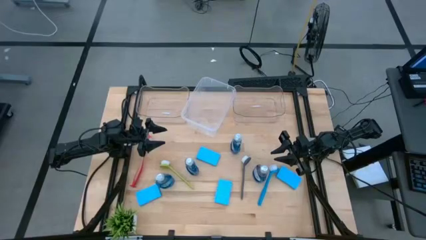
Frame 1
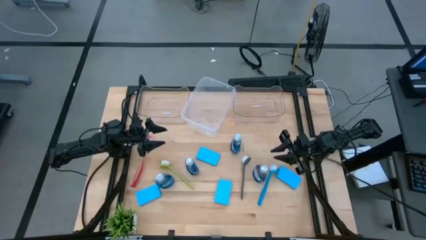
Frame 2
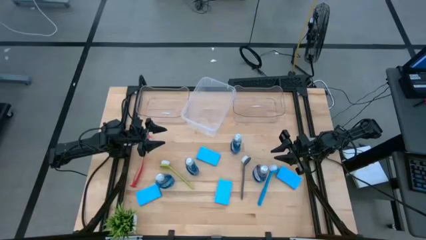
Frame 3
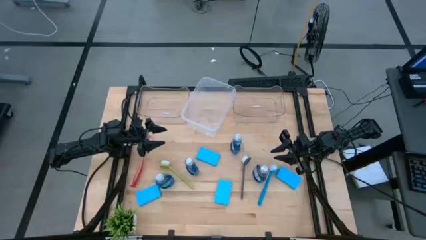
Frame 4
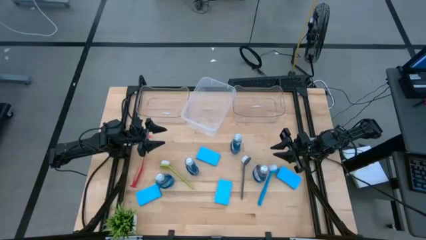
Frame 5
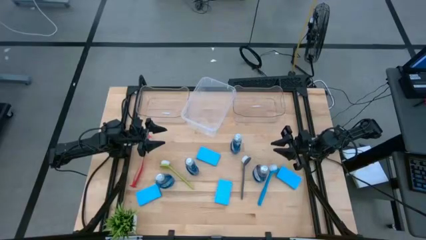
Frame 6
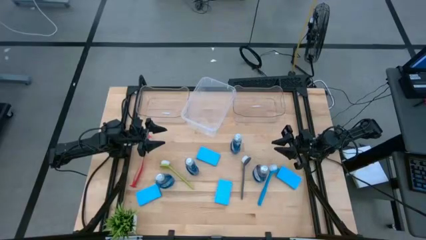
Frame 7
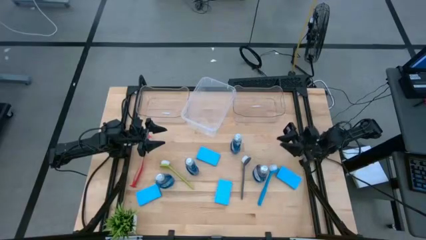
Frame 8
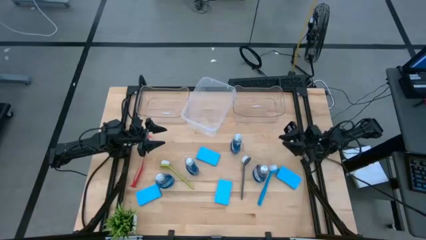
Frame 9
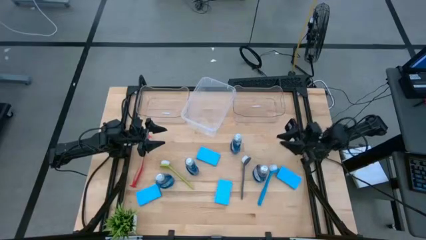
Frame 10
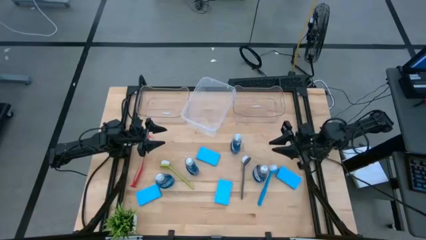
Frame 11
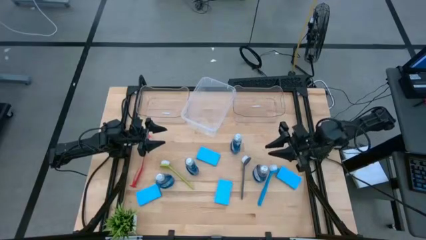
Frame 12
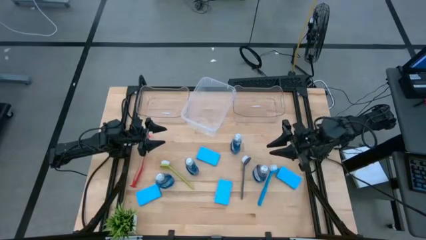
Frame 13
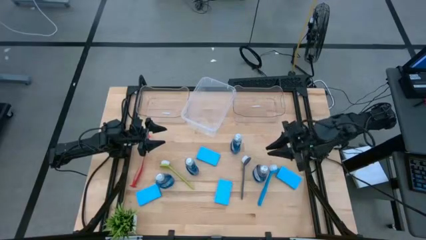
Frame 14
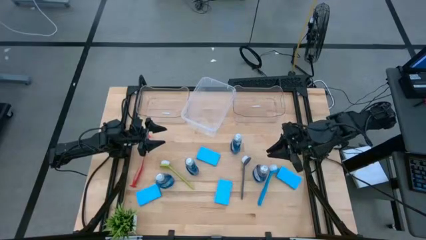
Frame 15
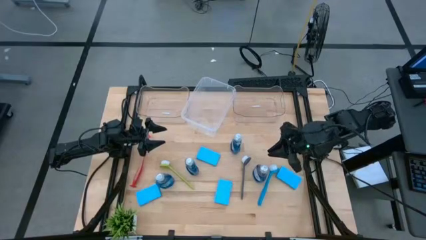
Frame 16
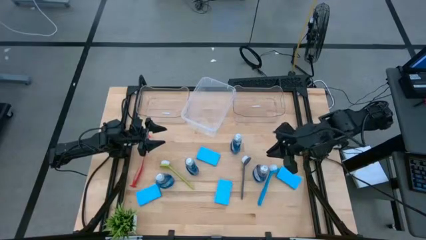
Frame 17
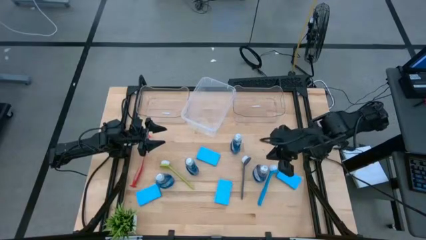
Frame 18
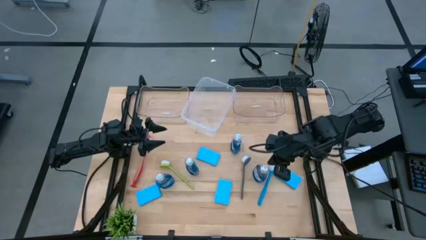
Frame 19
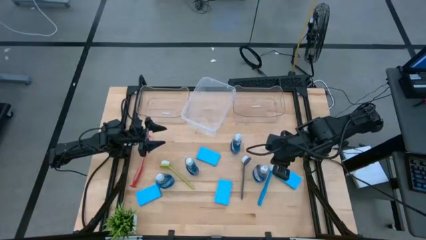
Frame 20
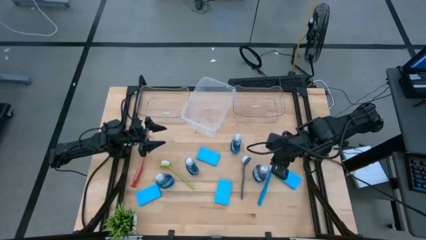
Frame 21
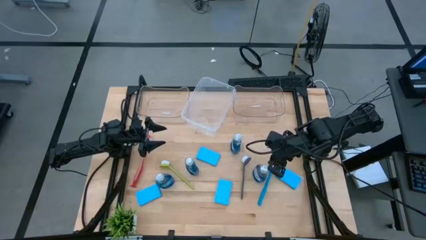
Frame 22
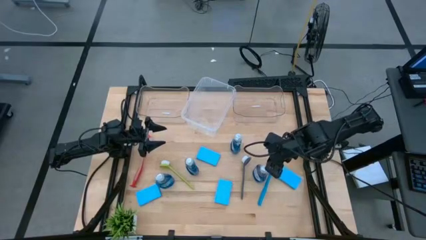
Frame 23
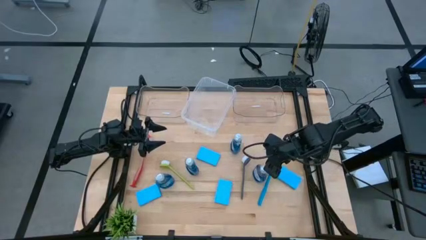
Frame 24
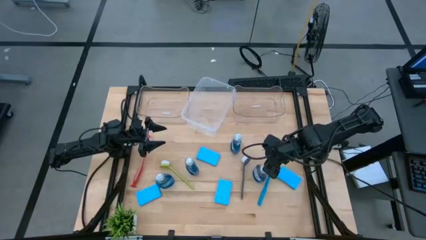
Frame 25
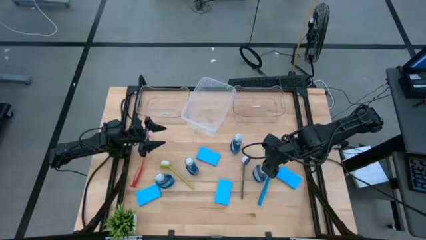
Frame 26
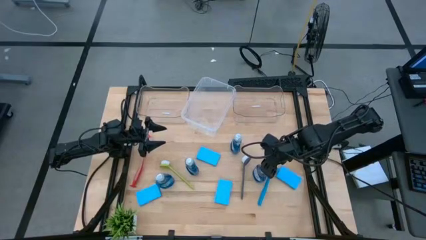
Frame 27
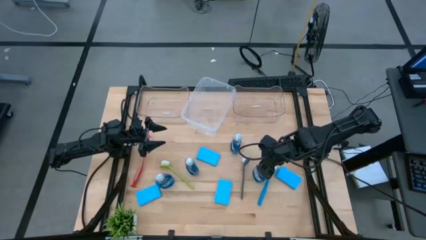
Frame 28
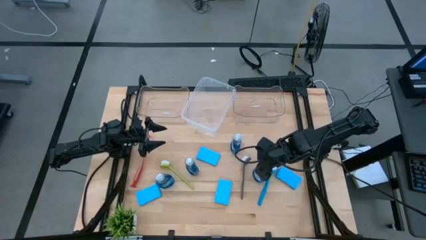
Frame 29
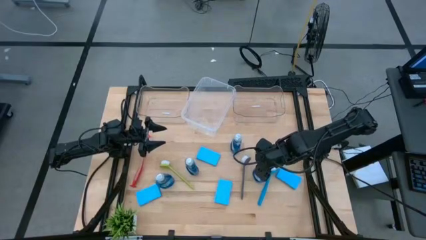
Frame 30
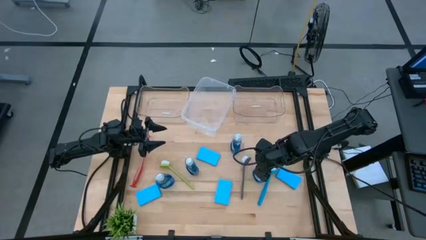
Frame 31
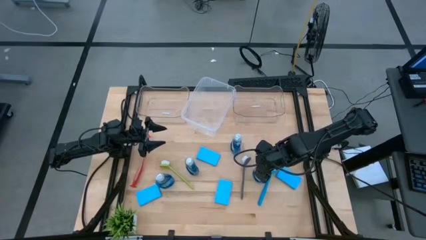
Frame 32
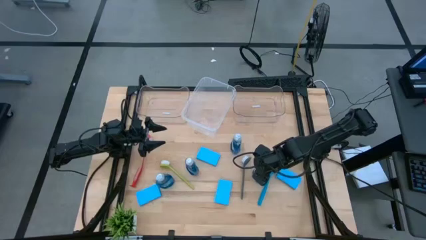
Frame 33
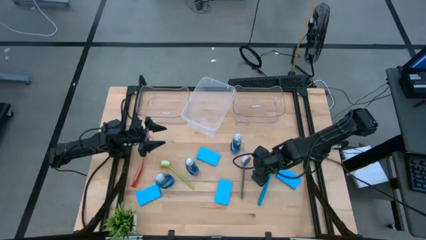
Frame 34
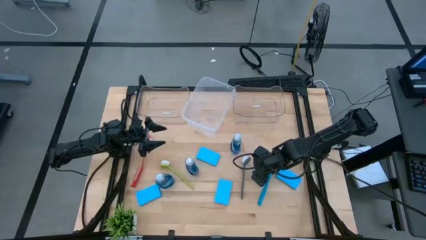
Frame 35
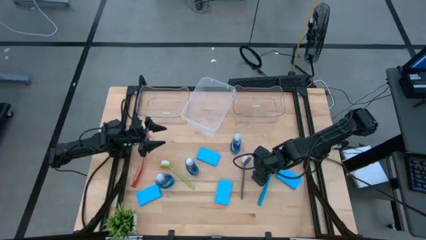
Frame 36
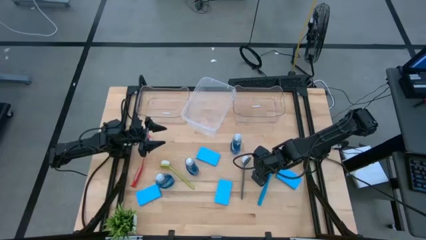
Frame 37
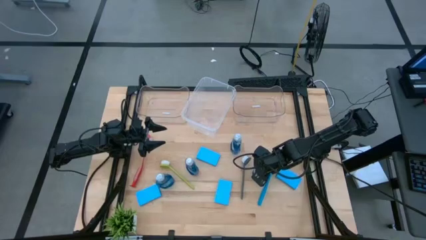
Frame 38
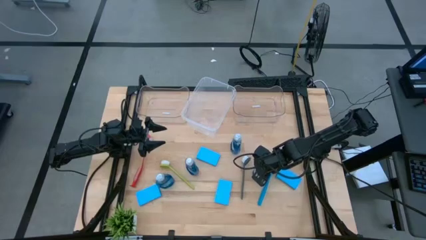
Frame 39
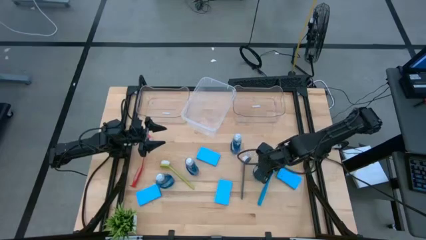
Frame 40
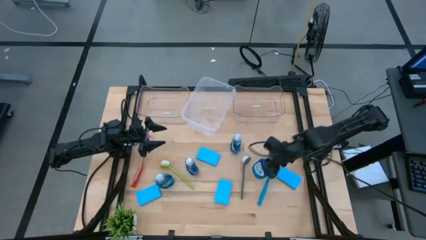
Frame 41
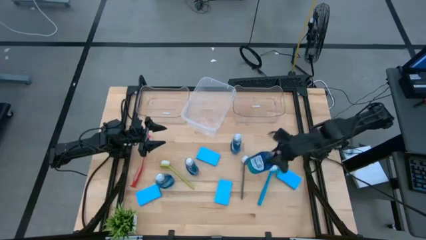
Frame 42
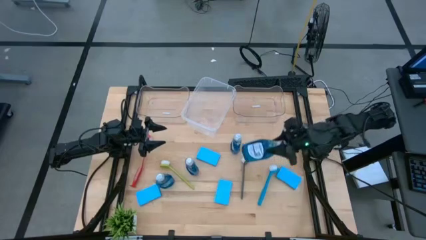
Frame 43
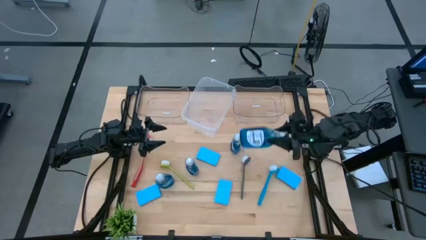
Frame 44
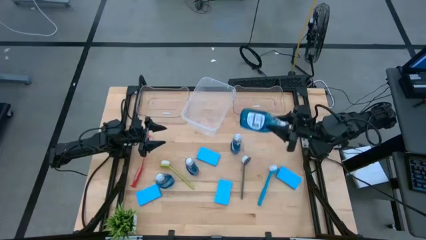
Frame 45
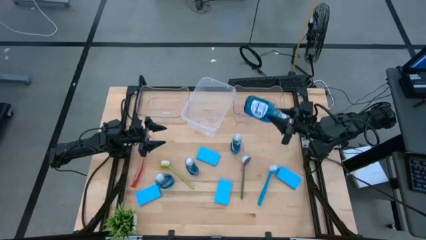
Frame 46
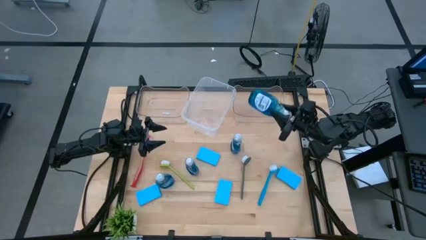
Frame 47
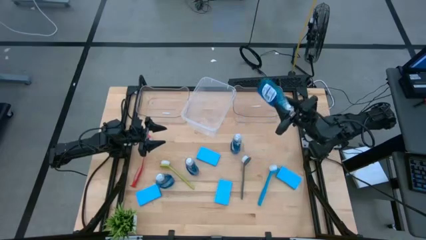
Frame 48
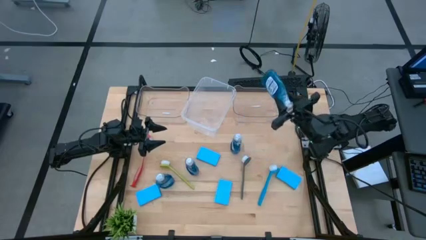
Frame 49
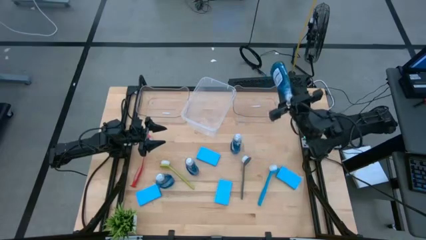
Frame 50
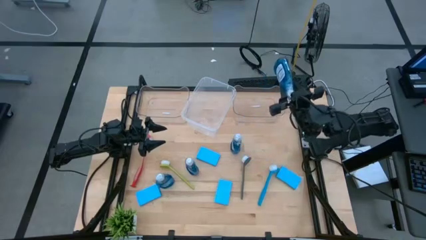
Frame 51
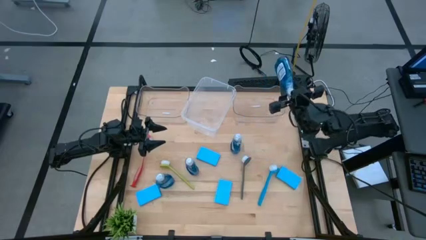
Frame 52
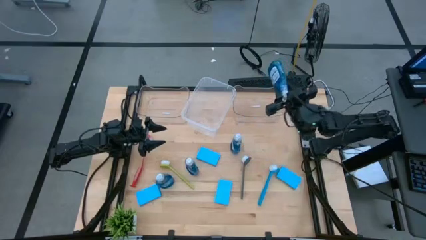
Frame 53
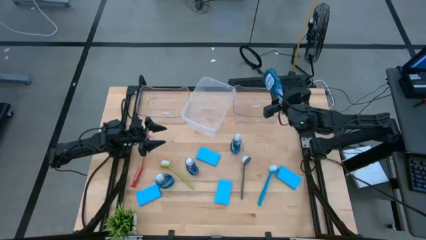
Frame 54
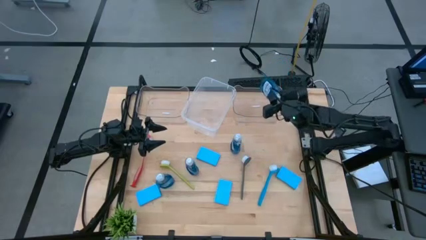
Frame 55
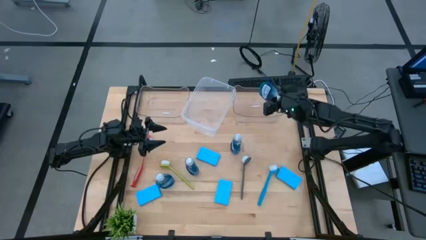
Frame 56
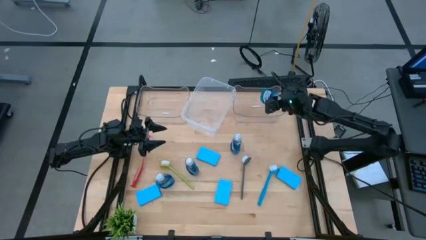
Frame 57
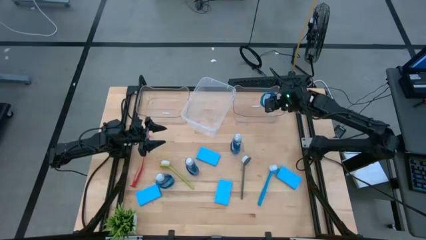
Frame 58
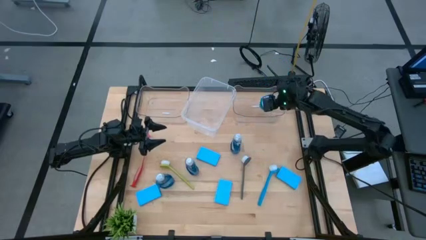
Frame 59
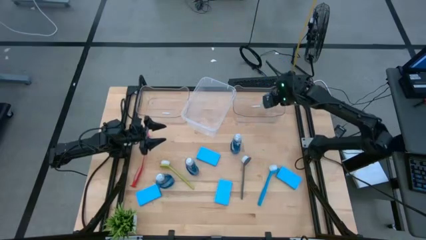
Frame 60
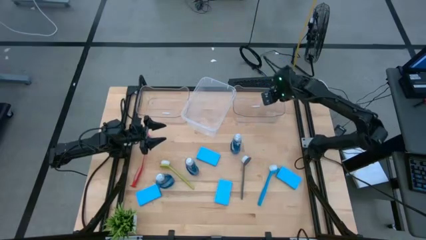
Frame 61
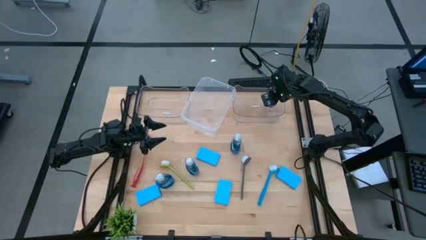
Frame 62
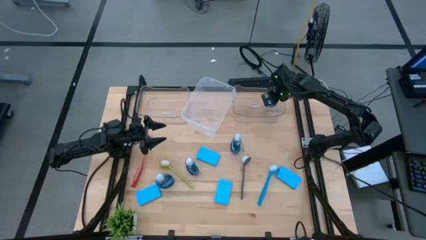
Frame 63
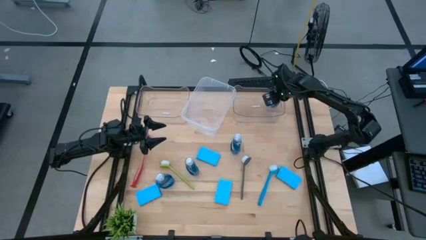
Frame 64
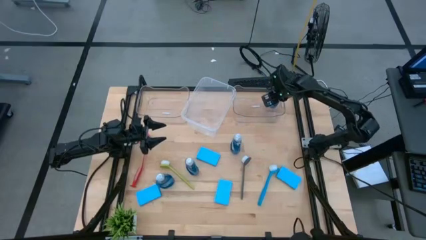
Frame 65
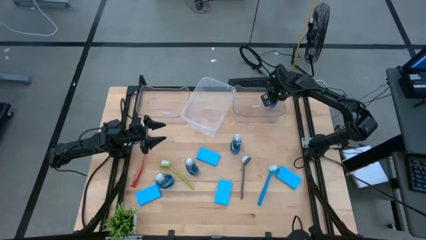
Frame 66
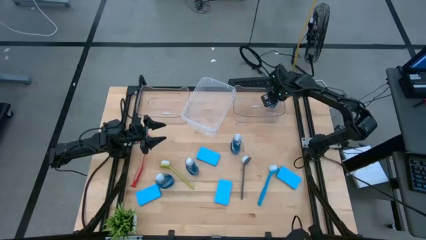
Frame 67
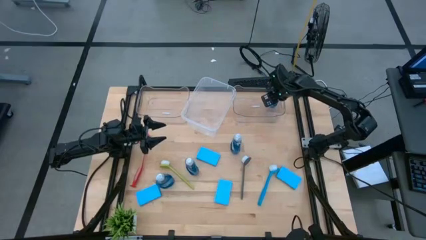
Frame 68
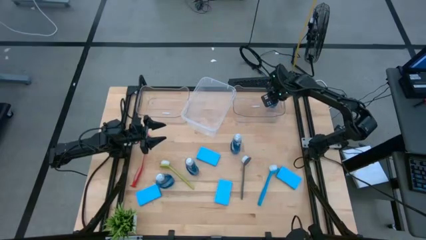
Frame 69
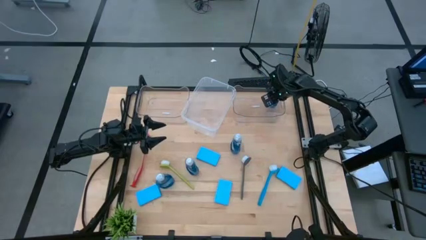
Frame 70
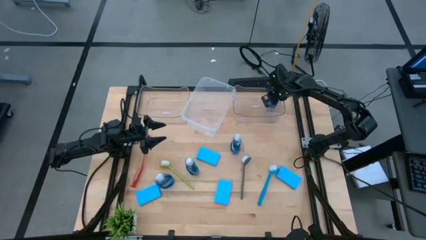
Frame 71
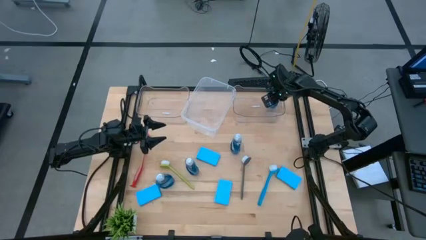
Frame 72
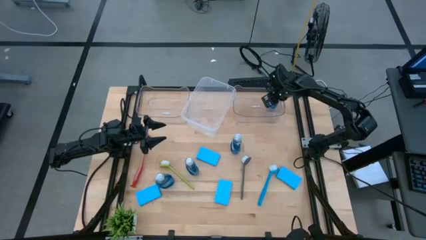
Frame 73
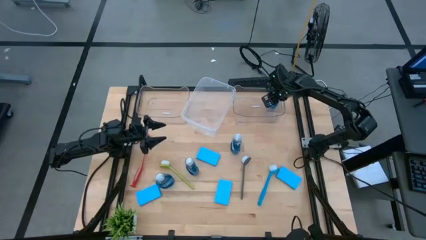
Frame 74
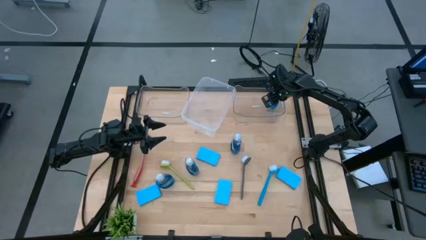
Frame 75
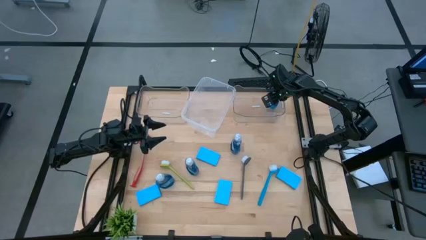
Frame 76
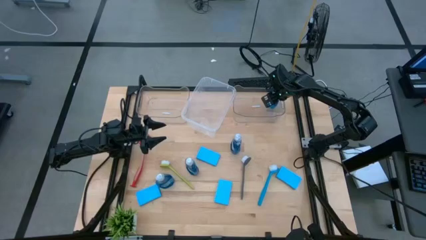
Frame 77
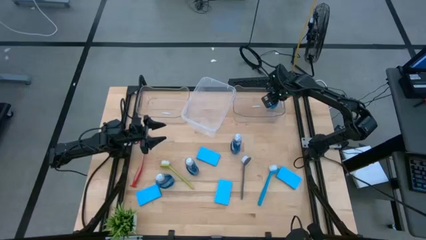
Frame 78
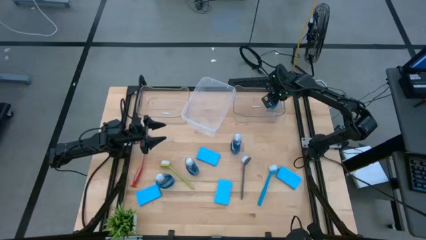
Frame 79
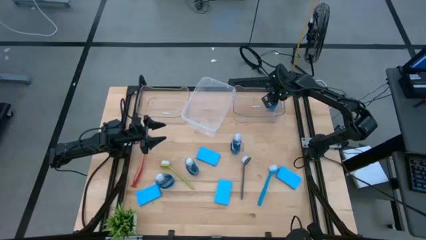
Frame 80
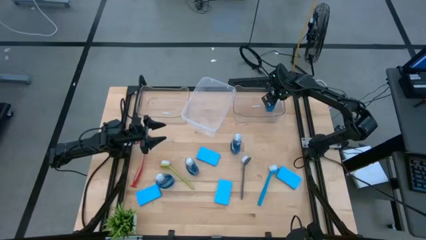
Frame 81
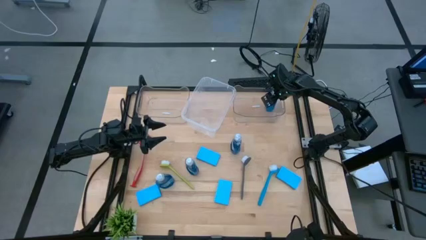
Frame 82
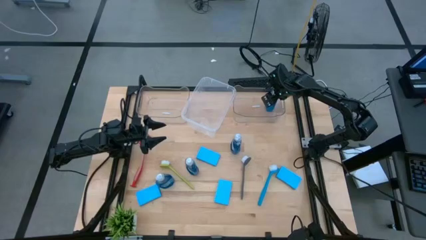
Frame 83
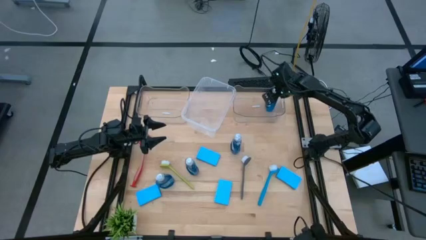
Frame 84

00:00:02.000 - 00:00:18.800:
Task: Pick & Place Kitchen Sink Supplies
Put the blue dish soap into the right transparent bin
